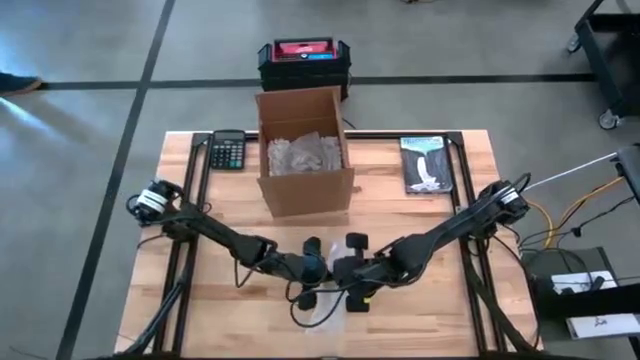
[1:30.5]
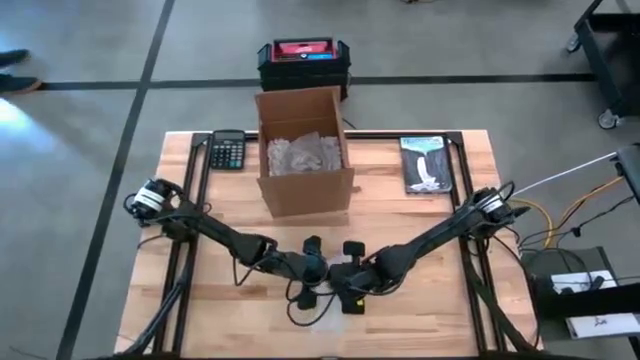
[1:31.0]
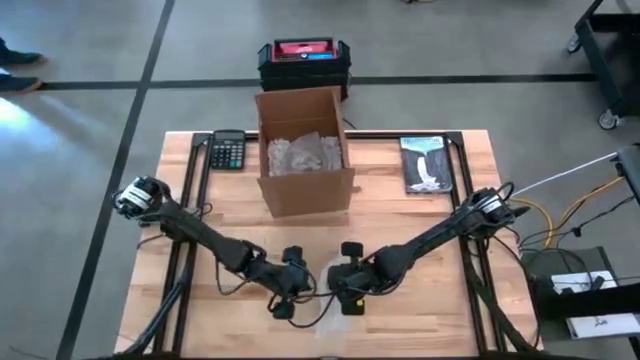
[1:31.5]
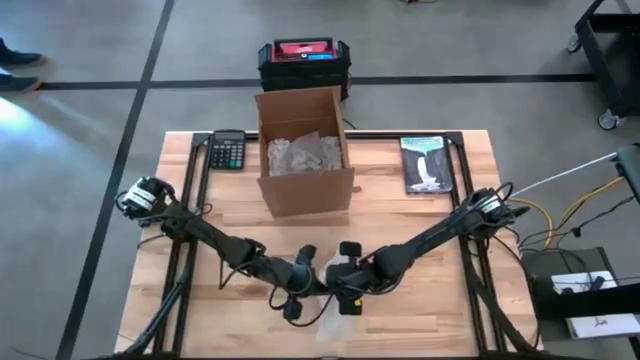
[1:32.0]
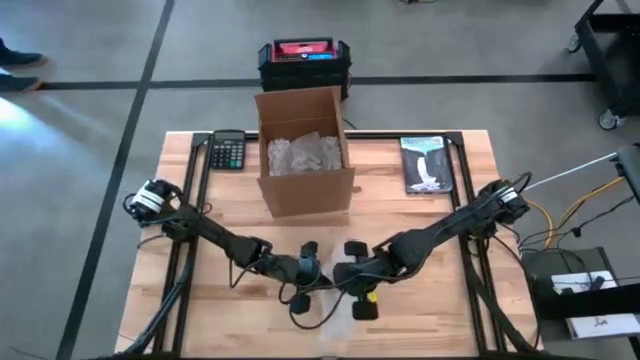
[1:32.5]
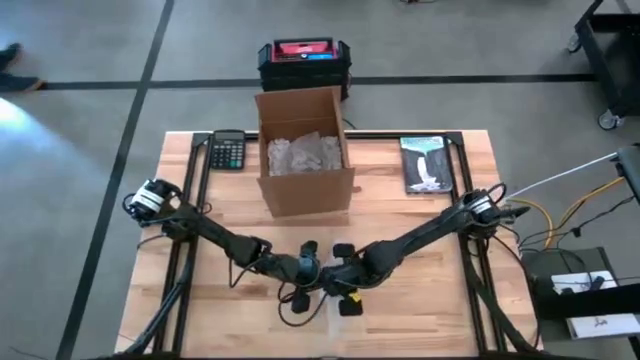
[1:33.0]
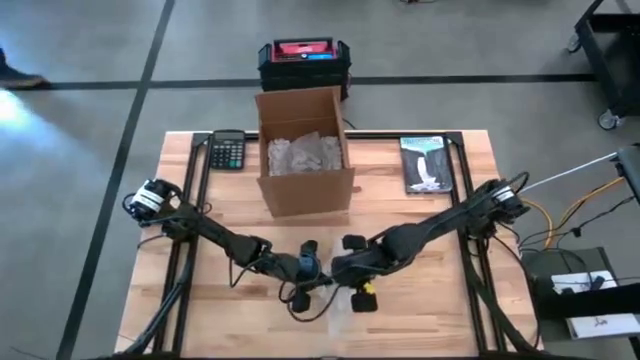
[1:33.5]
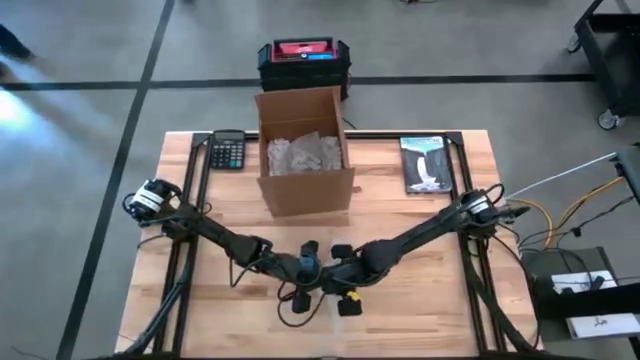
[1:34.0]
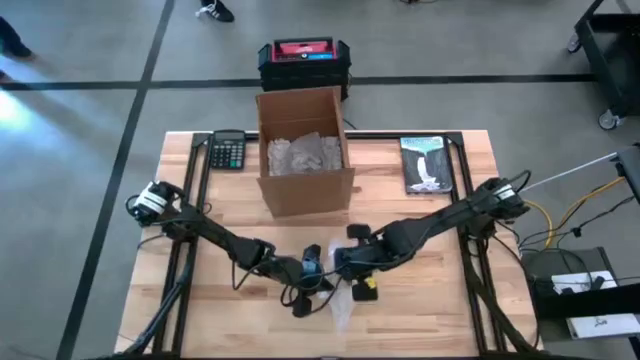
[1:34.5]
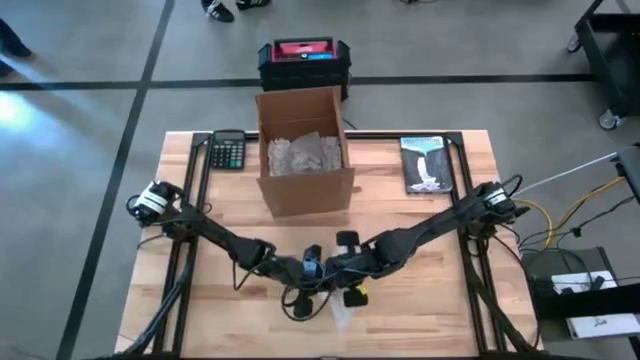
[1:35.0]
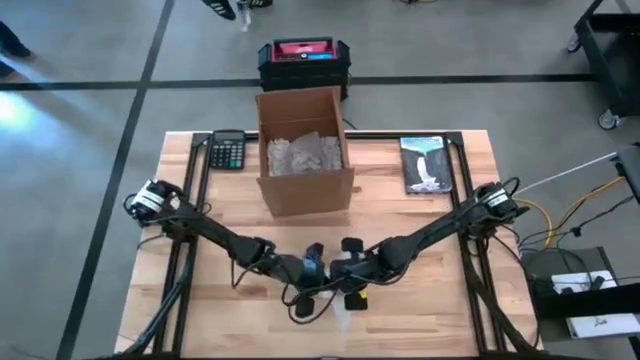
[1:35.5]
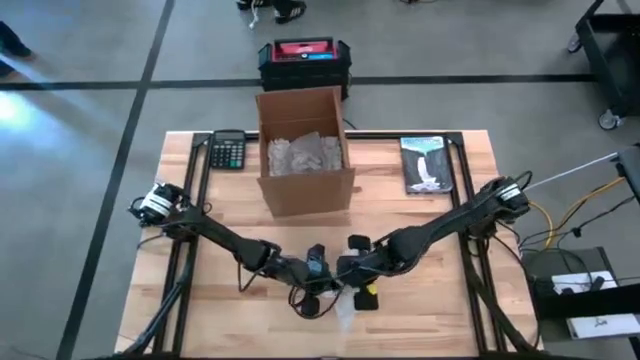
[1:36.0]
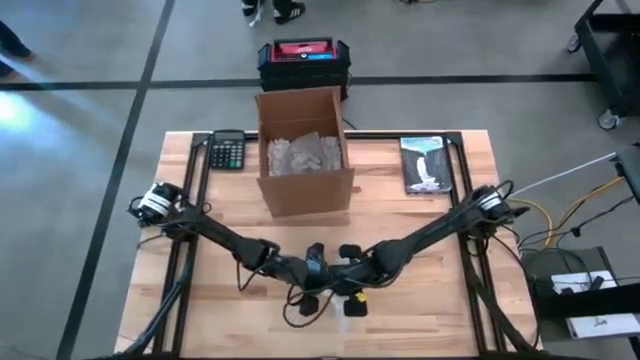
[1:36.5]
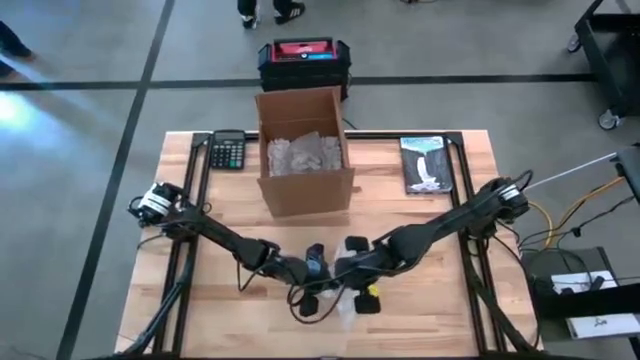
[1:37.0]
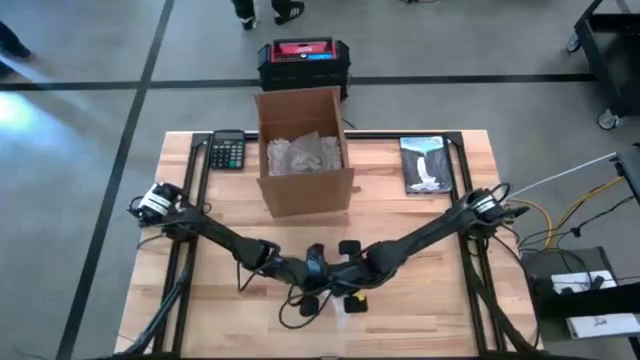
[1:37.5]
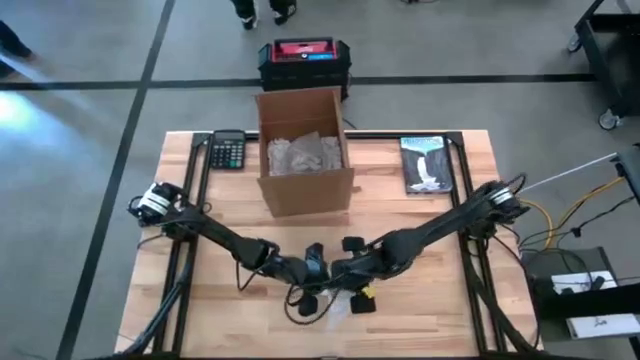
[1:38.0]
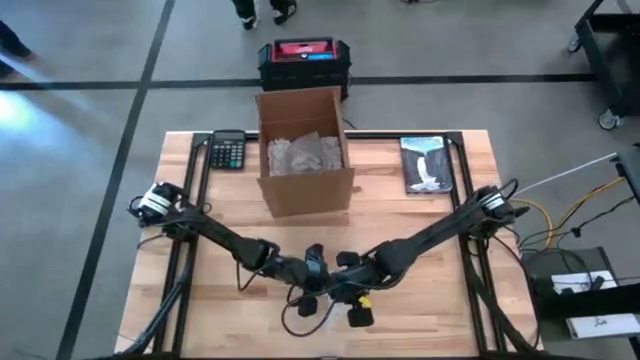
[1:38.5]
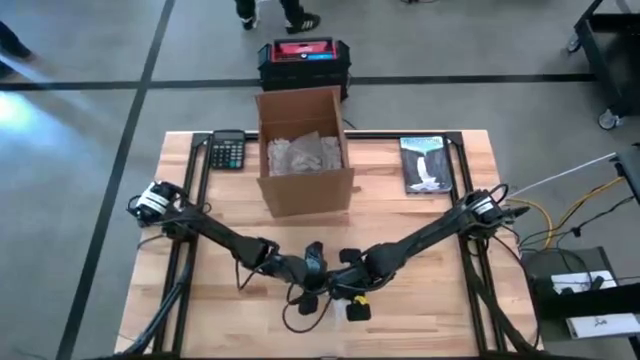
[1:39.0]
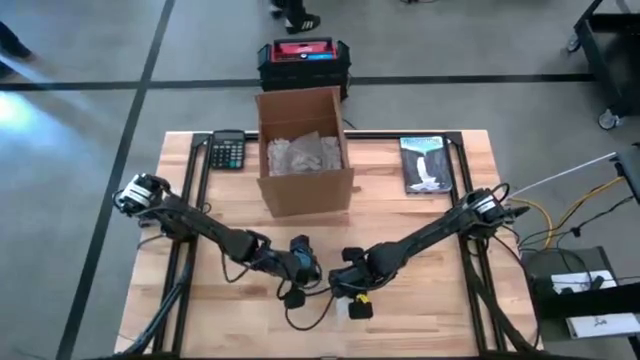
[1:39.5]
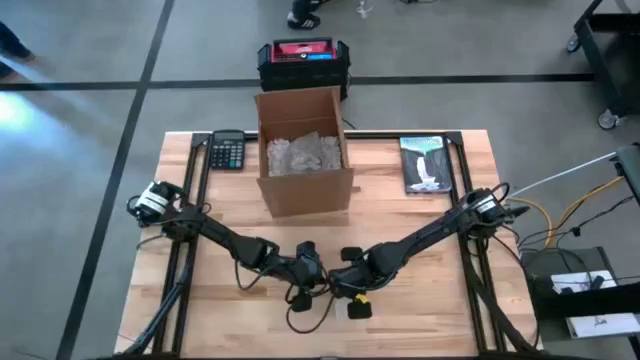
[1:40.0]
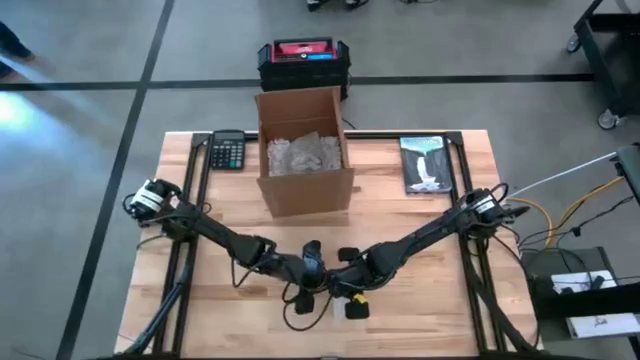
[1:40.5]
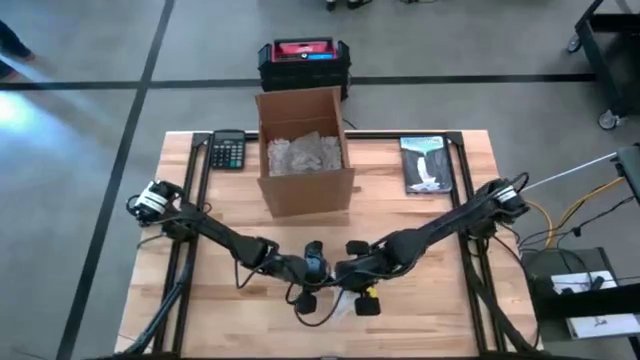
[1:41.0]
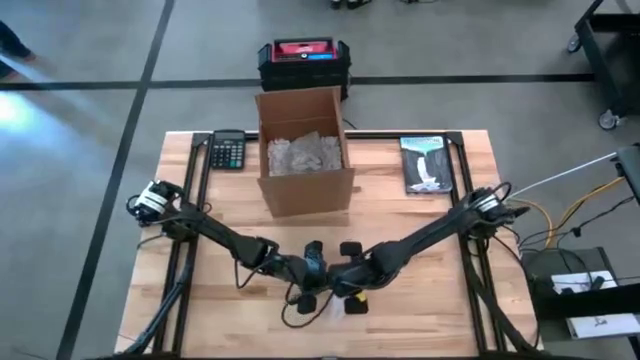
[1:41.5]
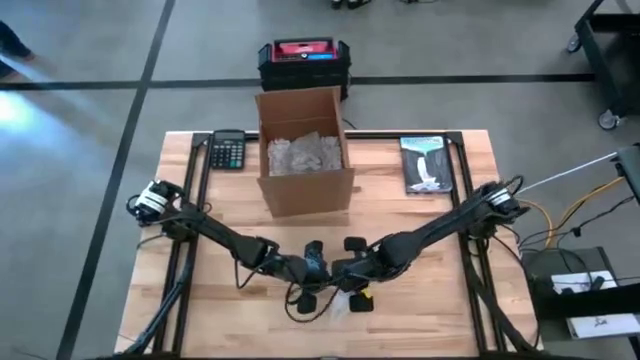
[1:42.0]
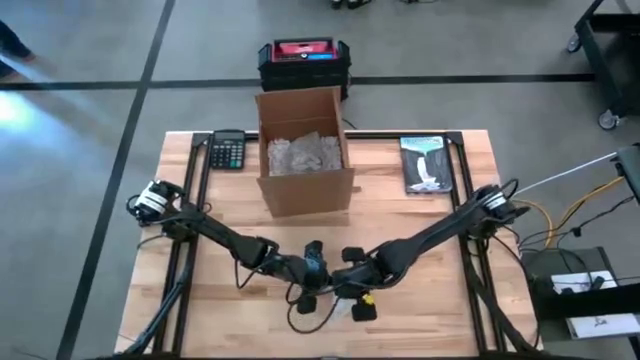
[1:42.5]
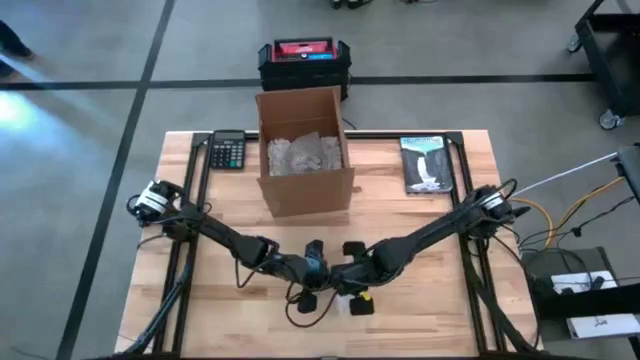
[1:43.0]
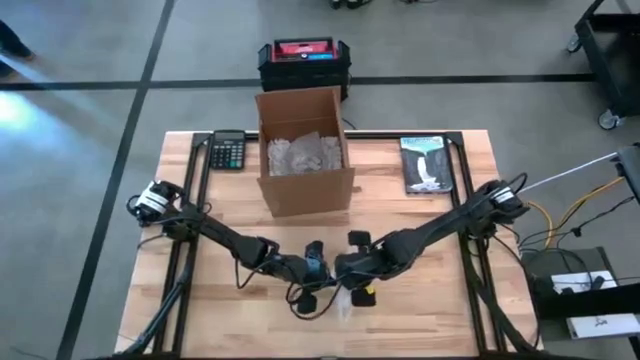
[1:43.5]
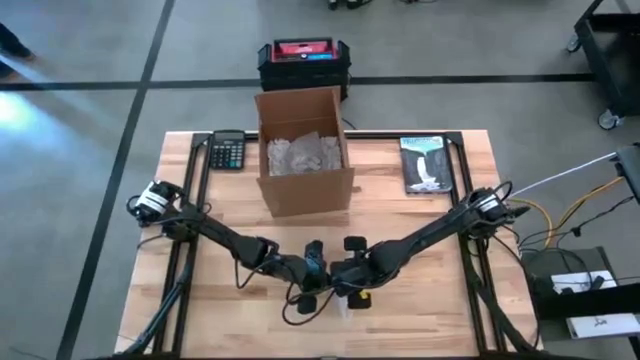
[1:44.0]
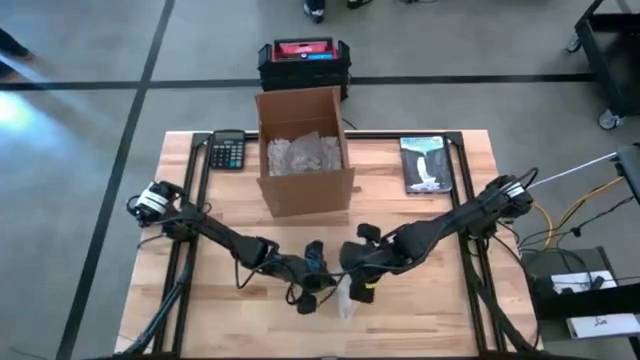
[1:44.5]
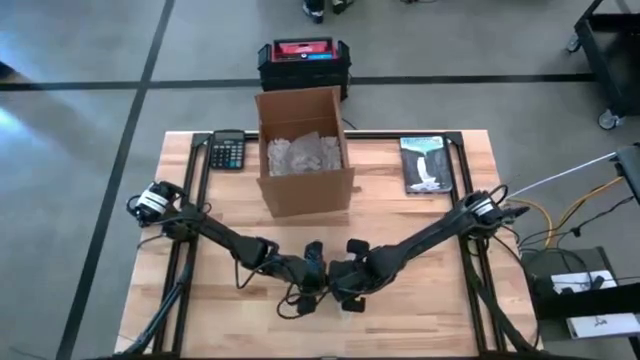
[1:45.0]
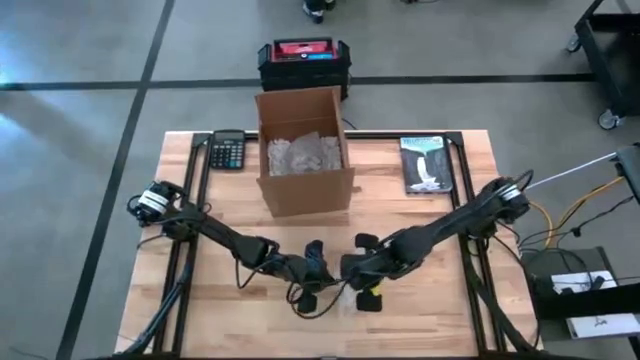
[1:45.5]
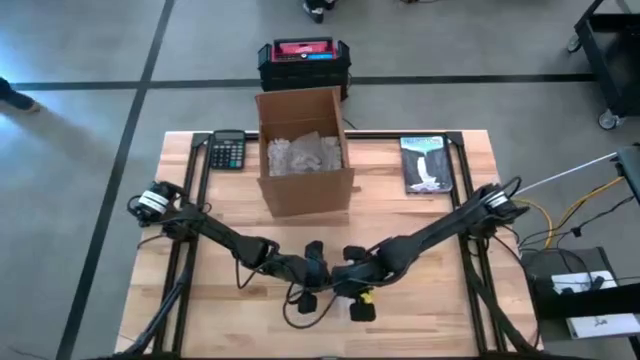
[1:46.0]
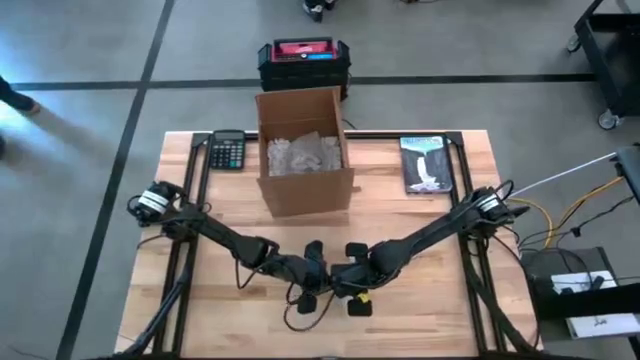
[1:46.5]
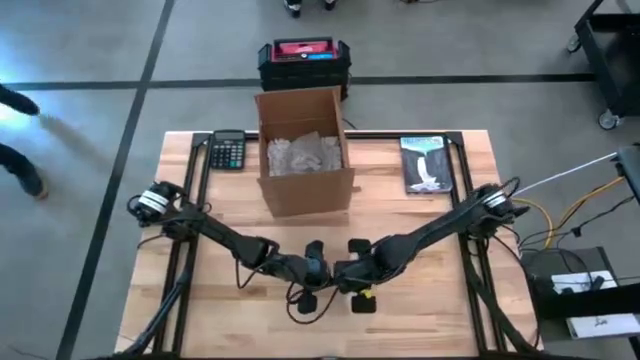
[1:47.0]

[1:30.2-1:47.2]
Task: wrap mug
Wrap the yellow mug with the transparent bubble wrap

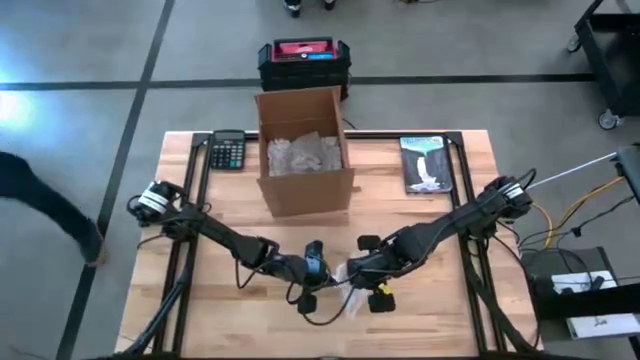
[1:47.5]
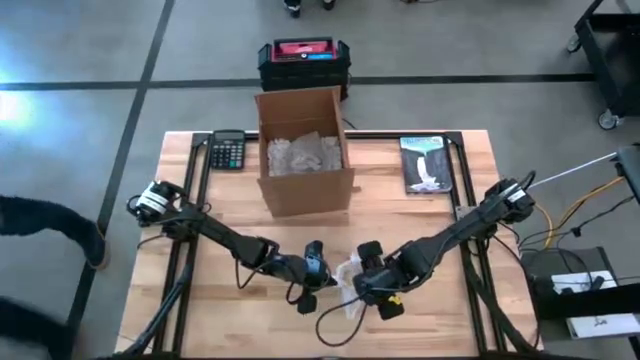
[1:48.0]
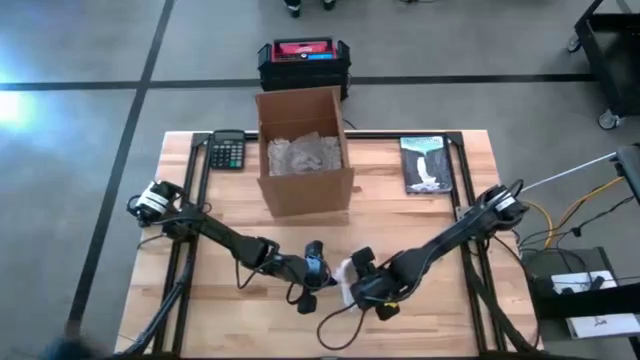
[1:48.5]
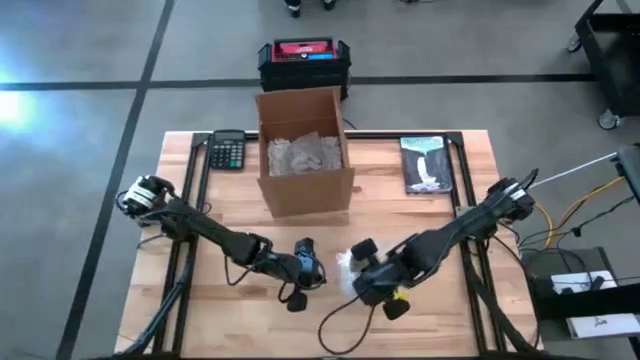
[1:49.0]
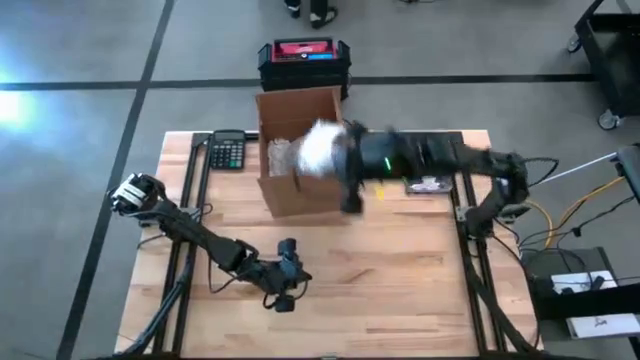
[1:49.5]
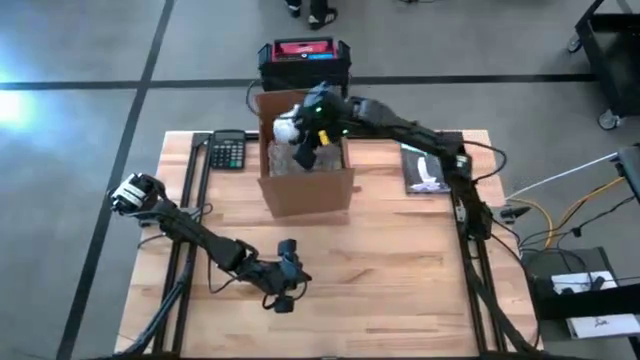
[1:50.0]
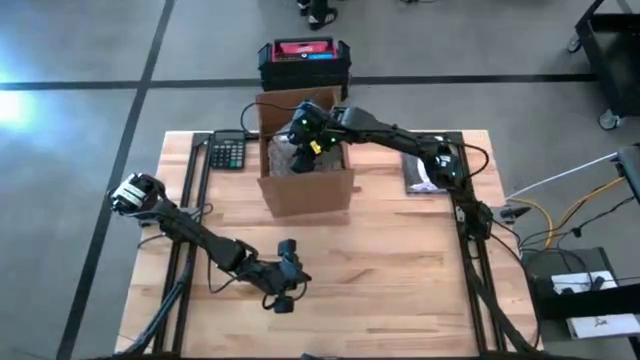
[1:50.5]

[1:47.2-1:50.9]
Put the wrapped yellow mug into the brown cardboard box

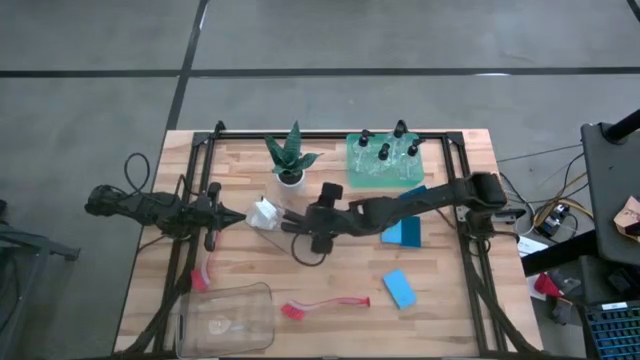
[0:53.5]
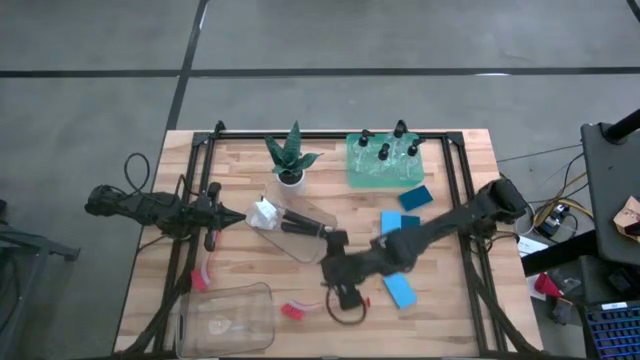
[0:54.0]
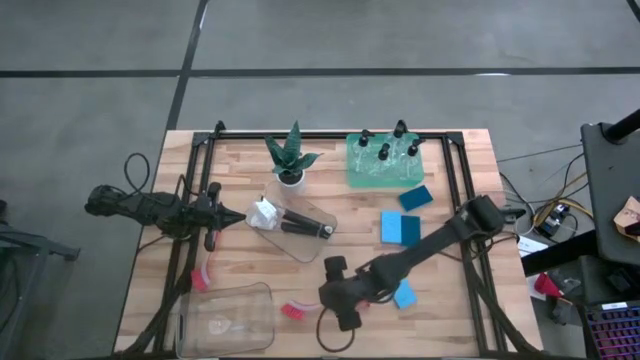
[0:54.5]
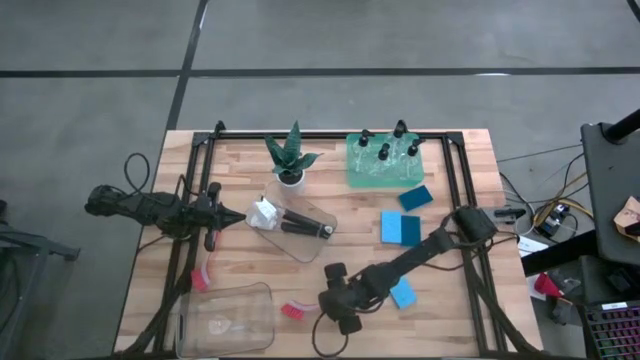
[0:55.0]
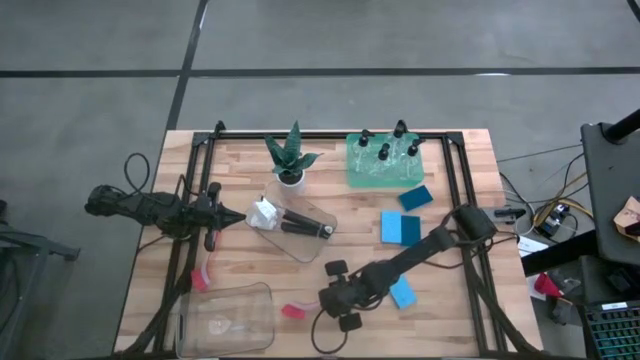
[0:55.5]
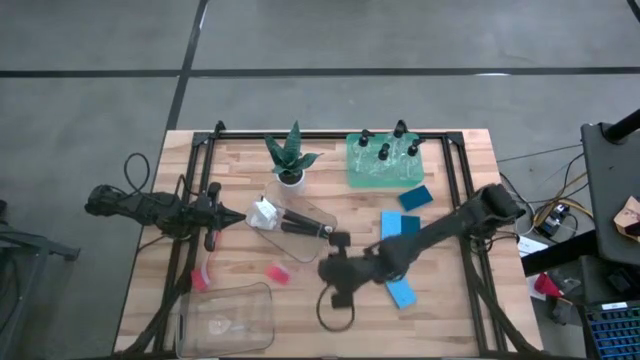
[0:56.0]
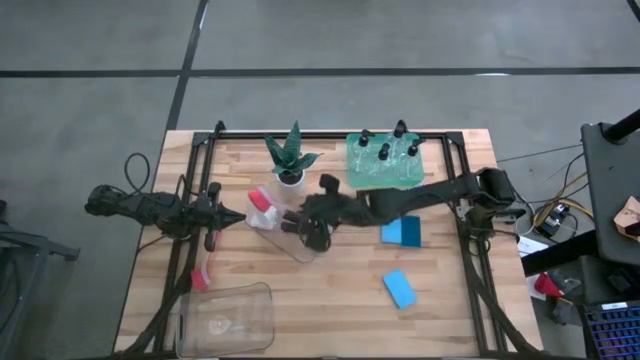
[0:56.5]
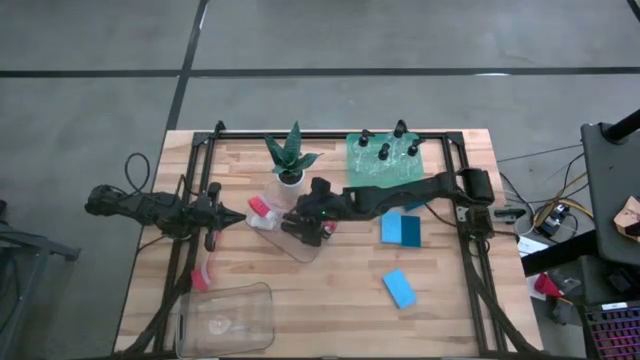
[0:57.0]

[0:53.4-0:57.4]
Task: Pick & Place Kitchen Sink Supplies
Put the orange dish brush into the top transparent bin
